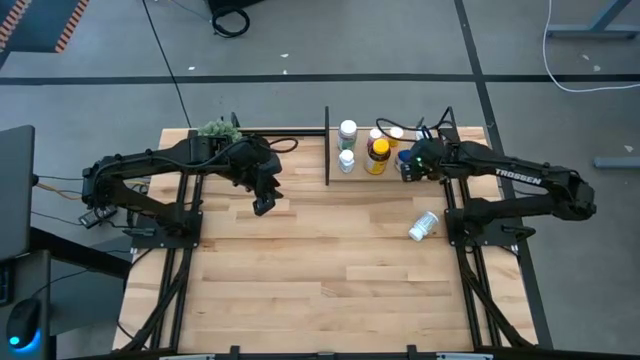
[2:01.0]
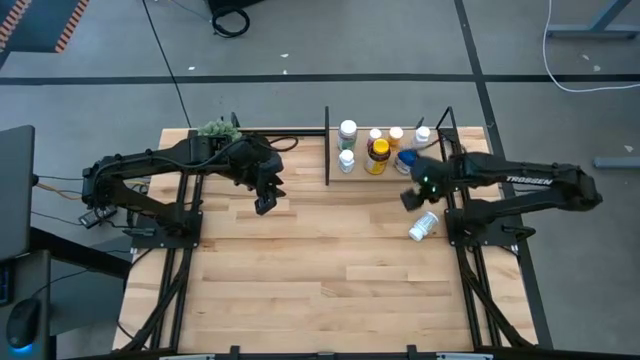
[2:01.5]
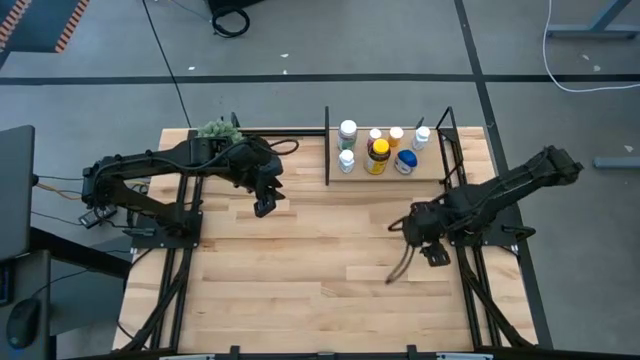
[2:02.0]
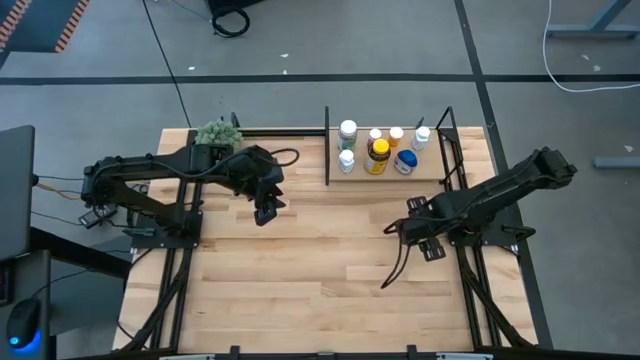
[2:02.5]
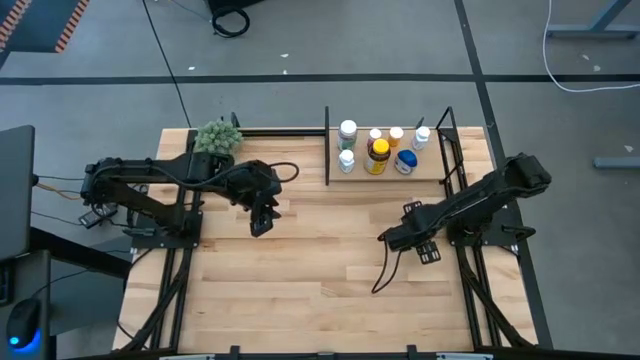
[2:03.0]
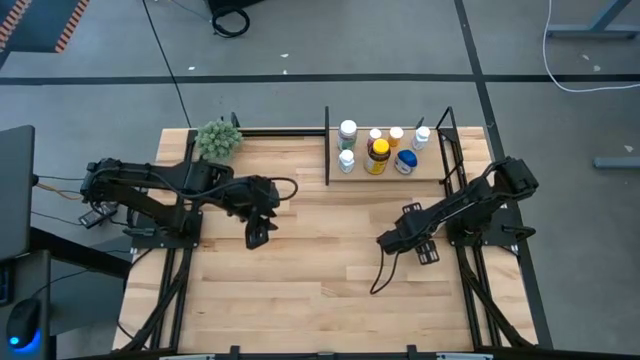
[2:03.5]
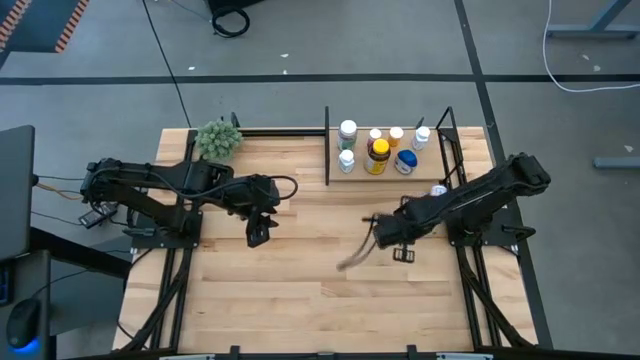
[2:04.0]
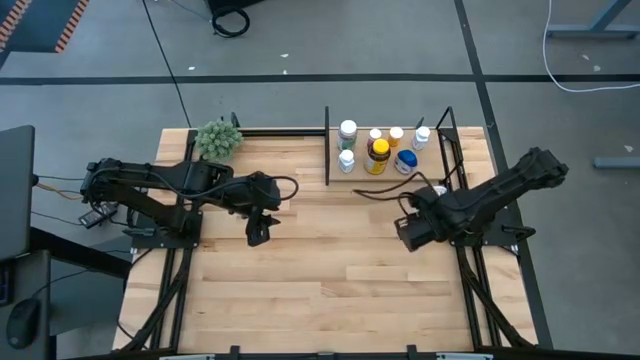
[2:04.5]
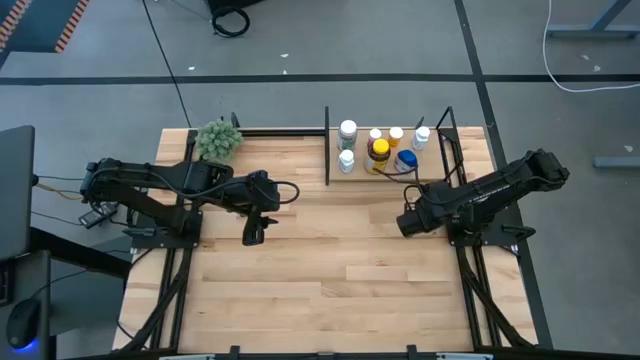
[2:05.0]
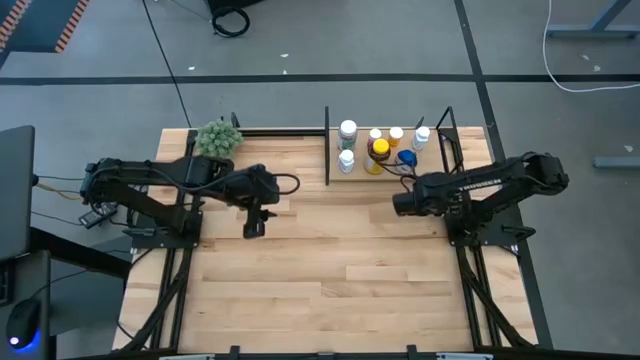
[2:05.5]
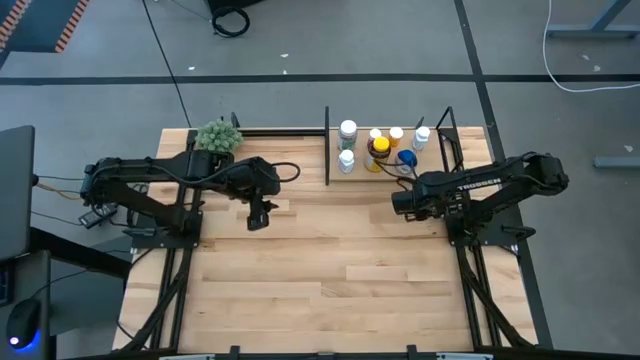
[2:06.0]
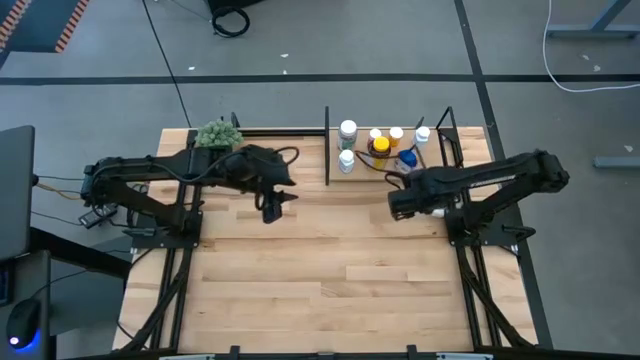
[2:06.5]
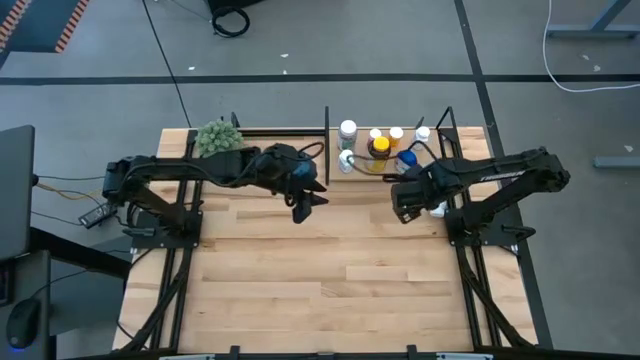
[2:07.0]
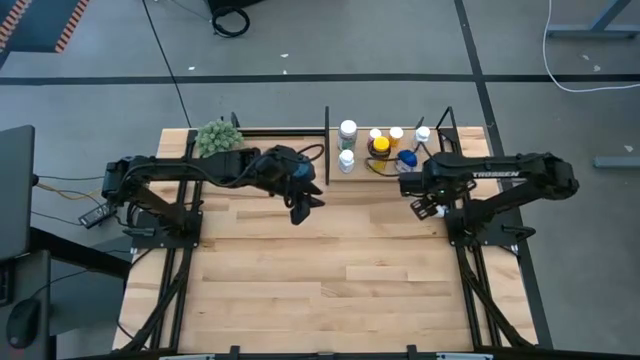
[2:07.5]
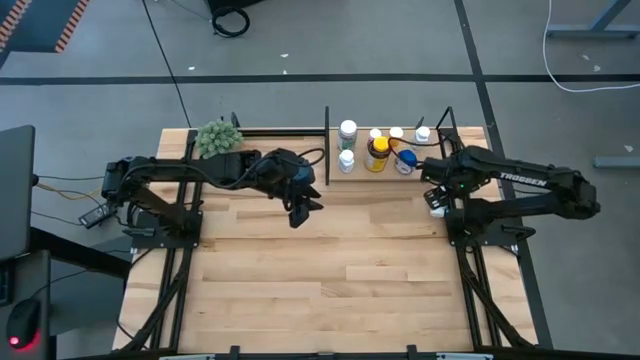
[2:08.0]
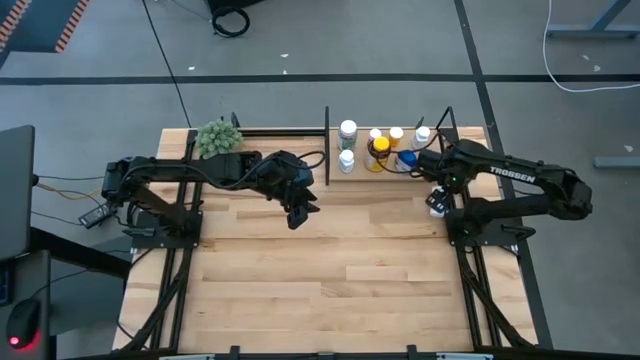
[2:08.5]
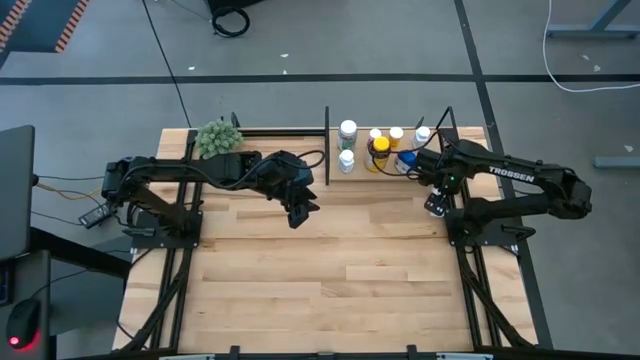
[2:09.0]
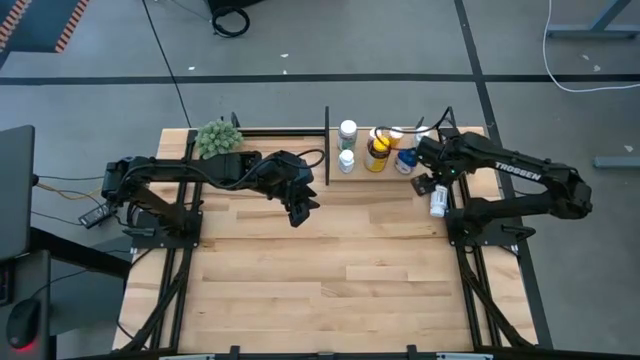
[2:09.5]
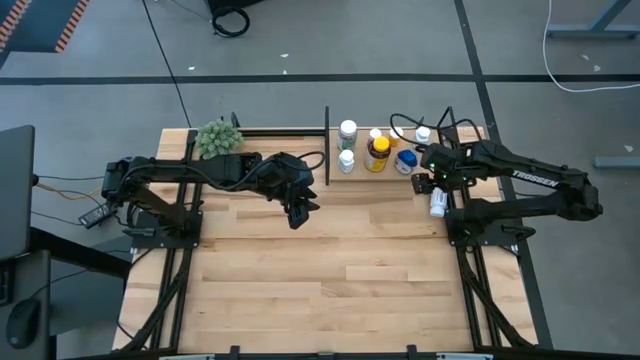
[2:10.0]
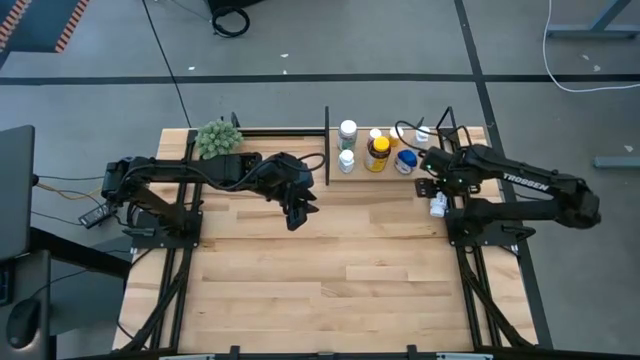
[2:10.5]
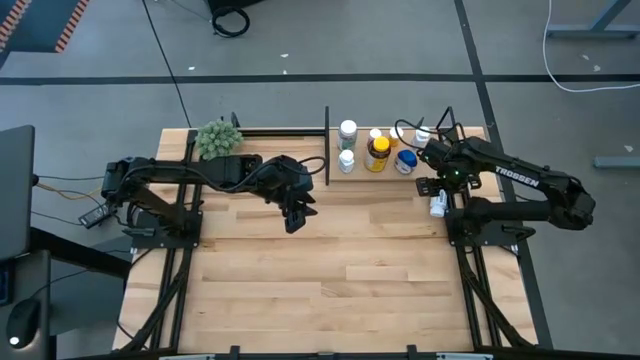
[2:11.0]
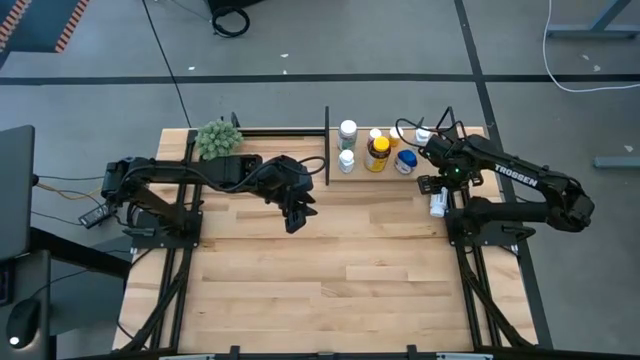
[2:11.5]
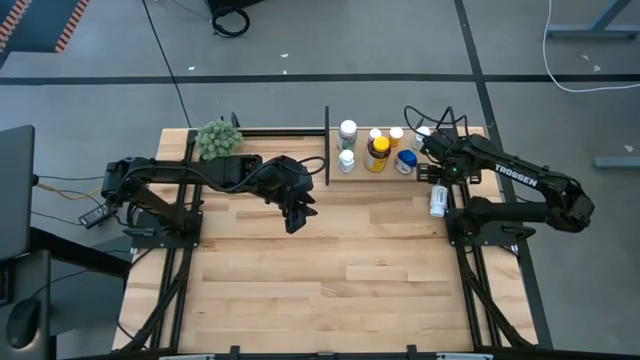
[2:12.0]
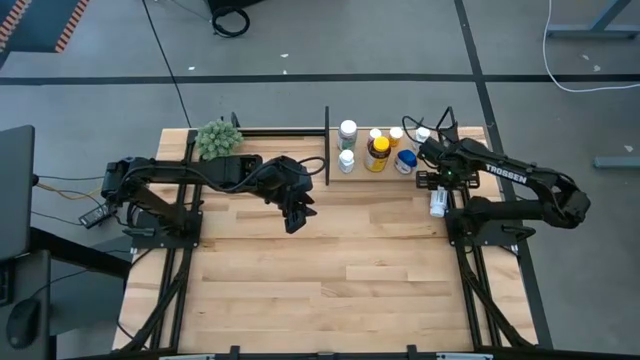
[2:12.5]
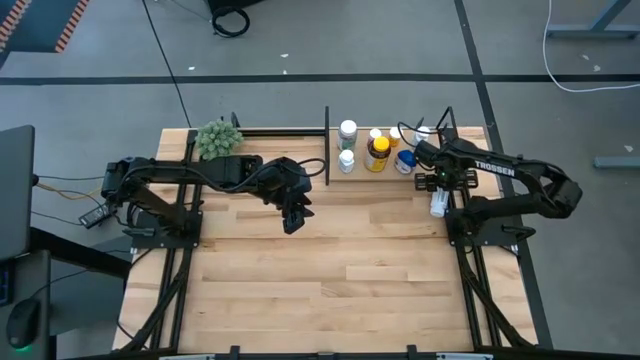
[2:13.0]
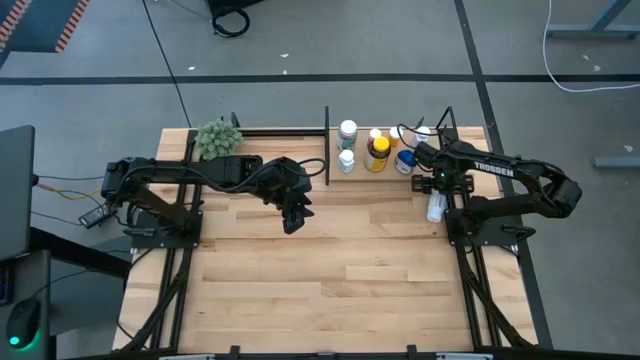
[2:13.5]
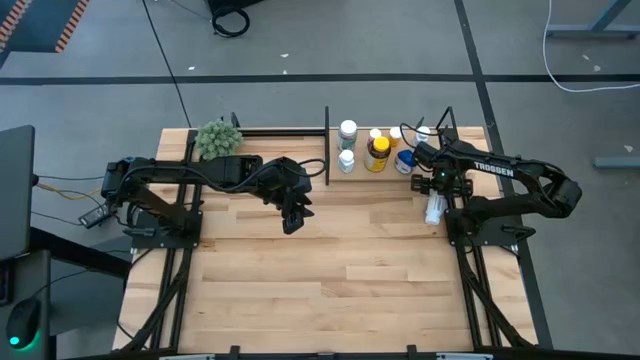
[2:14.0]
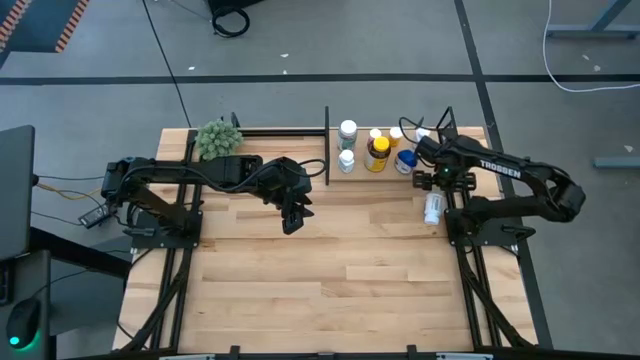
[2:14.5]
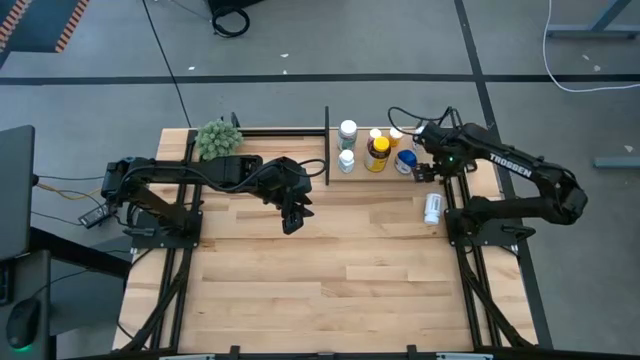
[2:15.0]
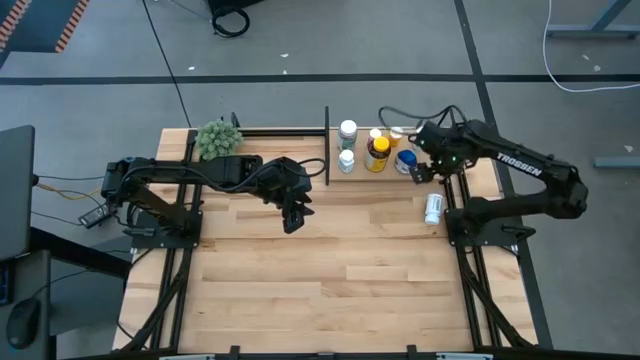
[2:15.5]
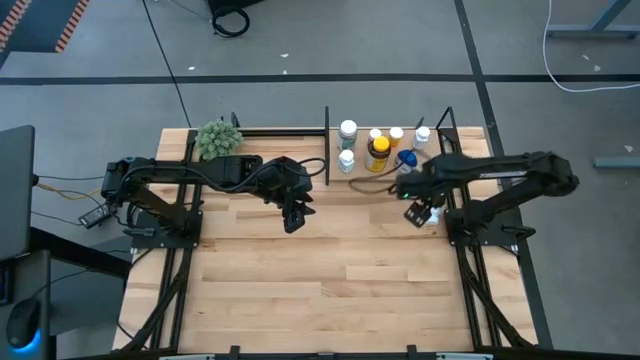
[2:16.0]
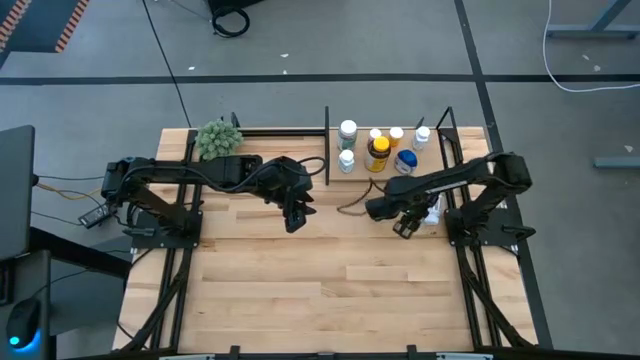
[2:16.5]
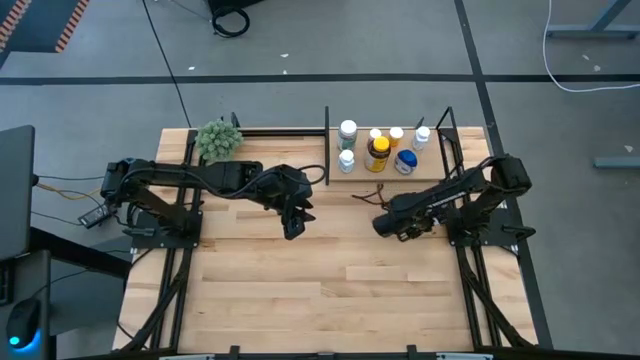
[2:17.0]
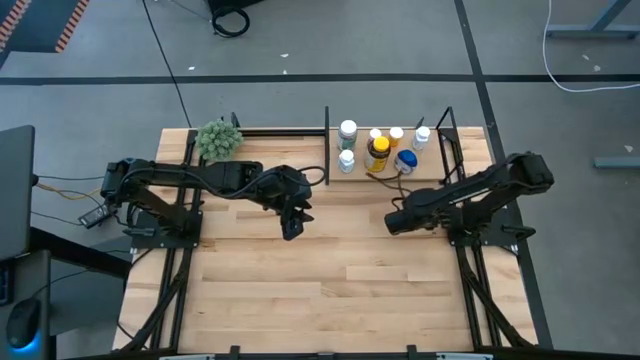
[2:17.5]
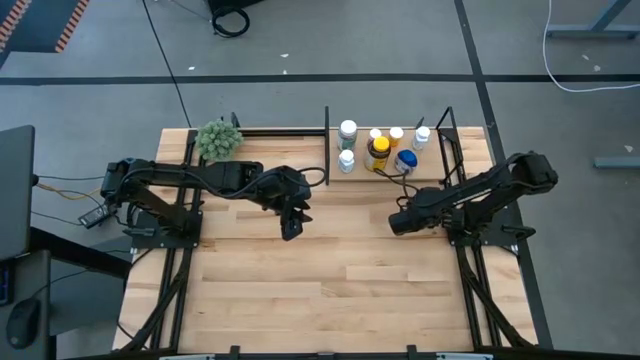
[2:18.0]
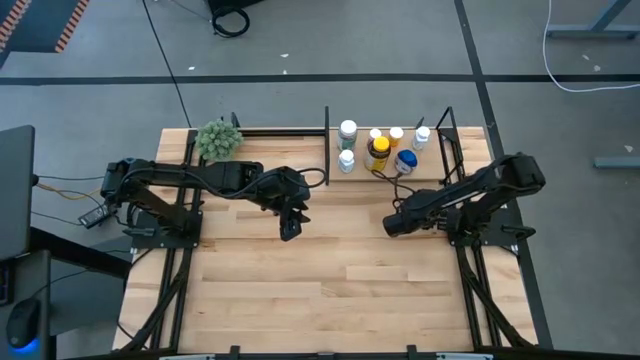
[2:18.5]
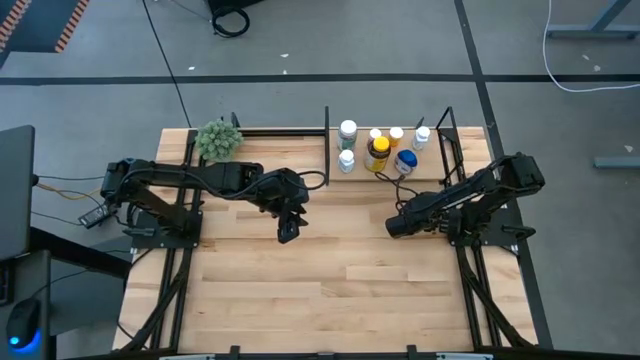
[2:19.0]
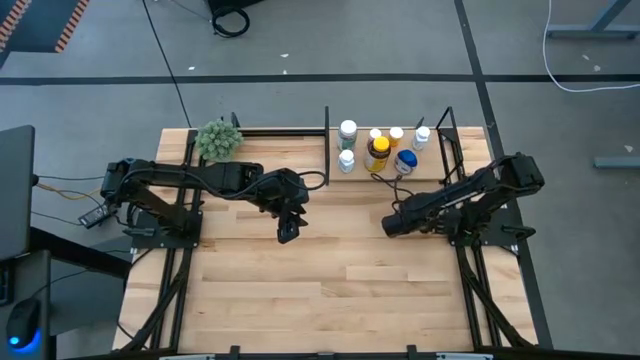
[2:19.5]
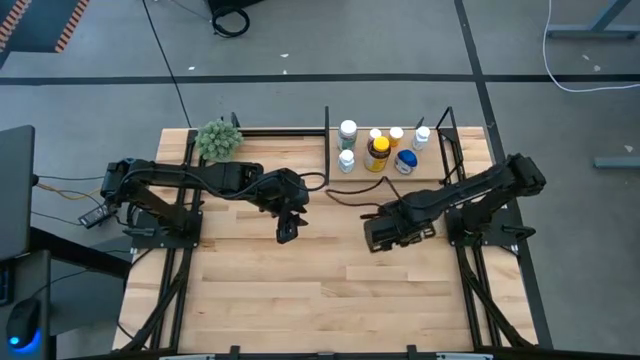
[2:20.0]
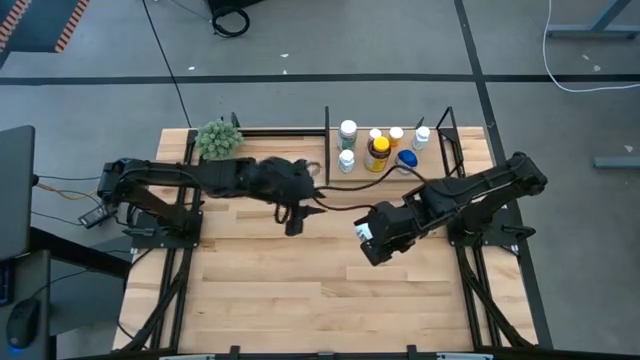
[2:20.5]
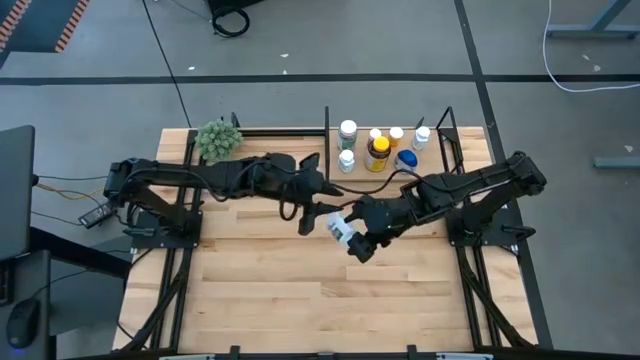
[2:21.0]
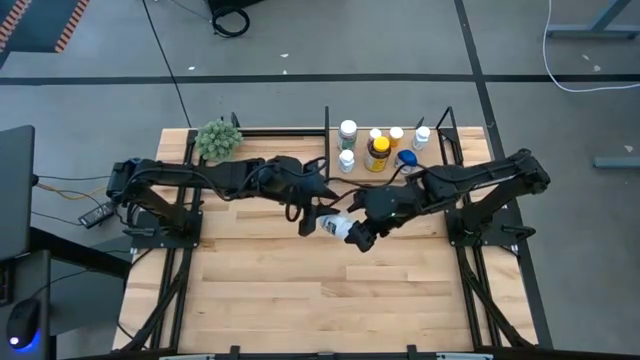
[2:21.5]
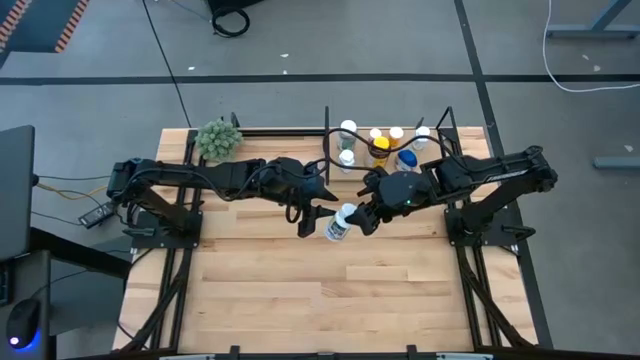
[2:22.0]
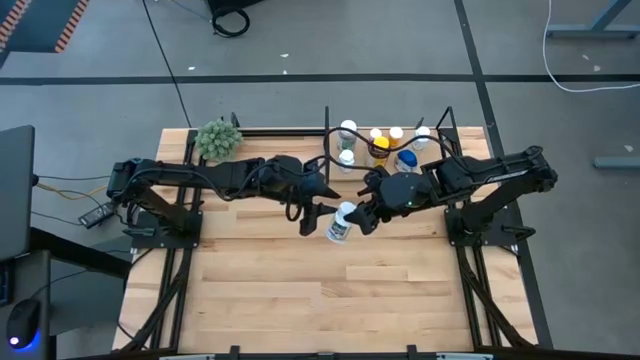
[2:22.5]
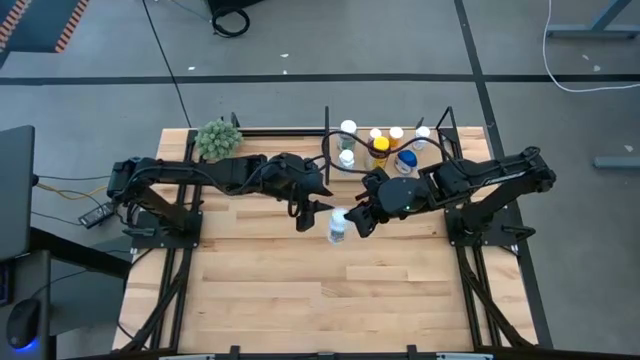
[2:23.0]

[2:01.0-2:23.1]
Task: Pick and place medicine bottles onto shelf by color
Put the white pill bottle on the shelf
